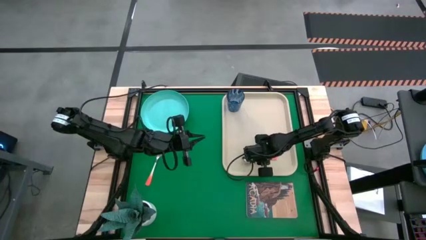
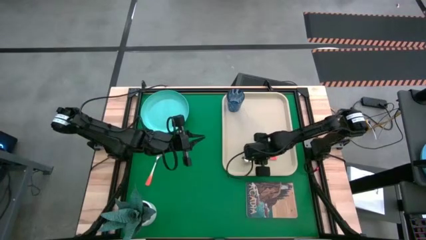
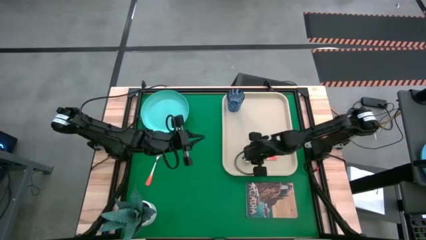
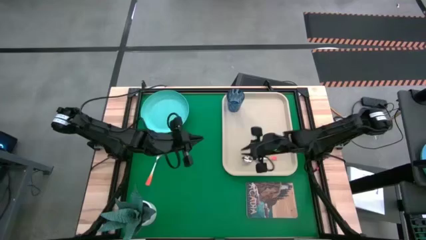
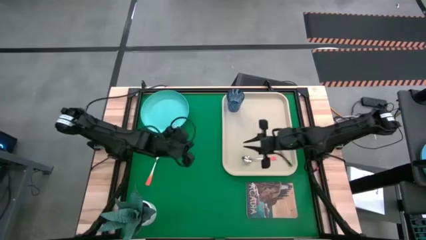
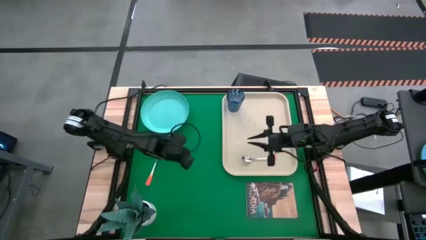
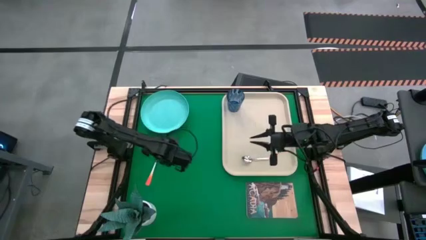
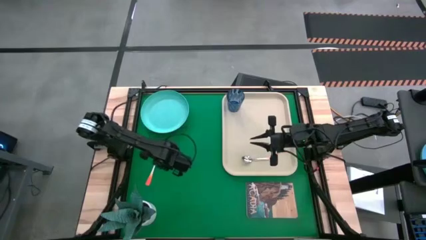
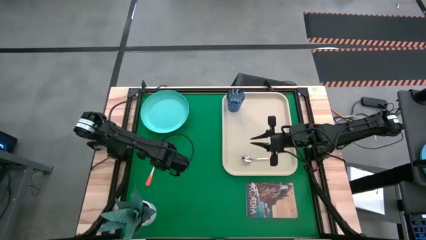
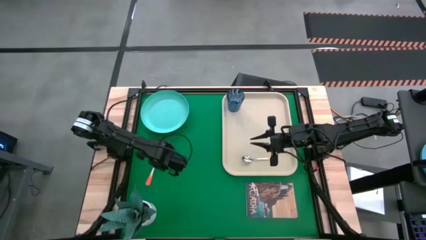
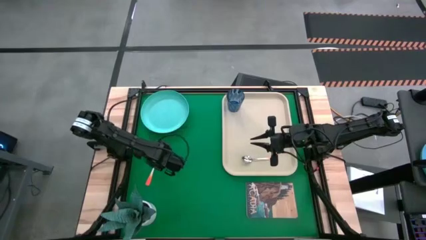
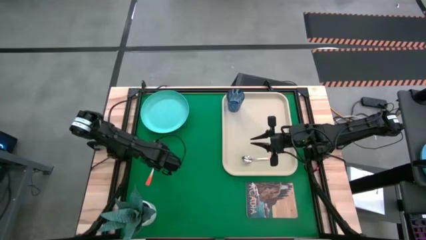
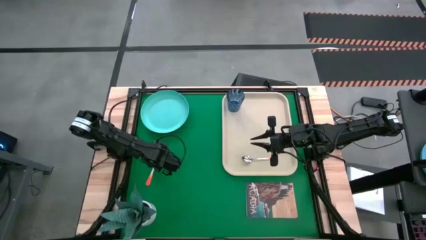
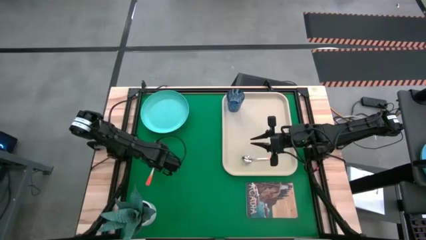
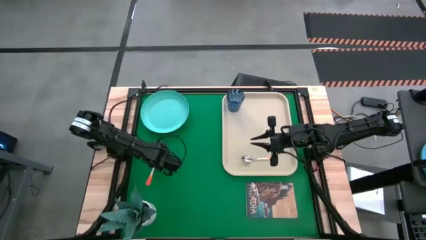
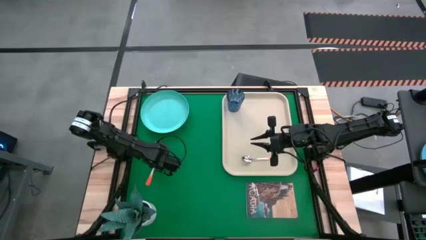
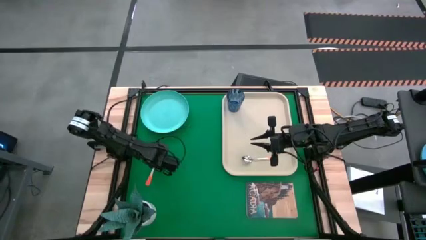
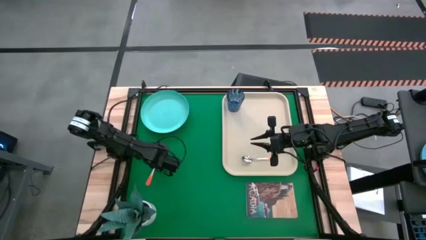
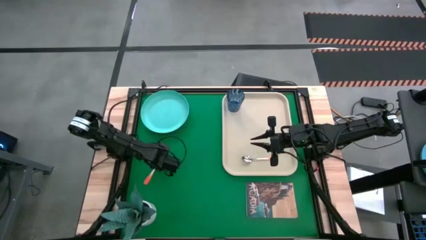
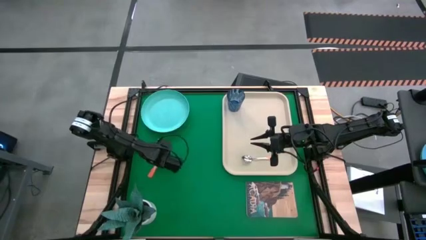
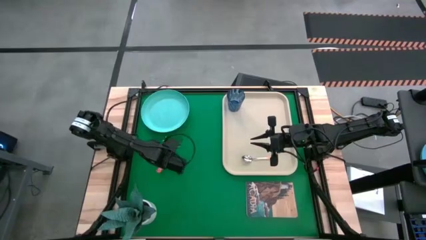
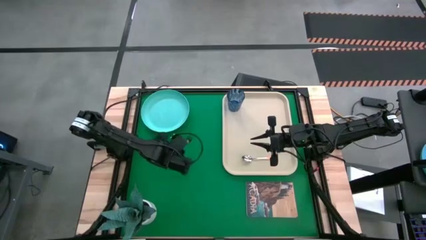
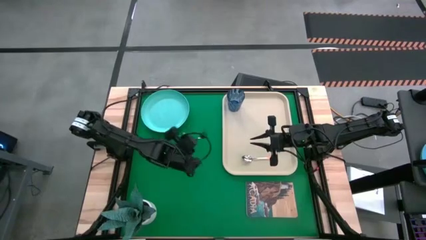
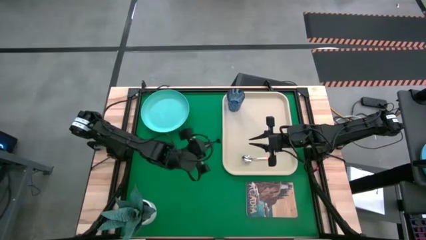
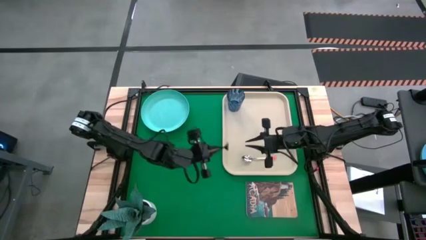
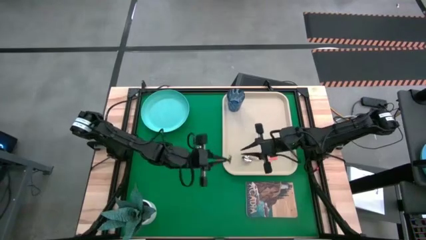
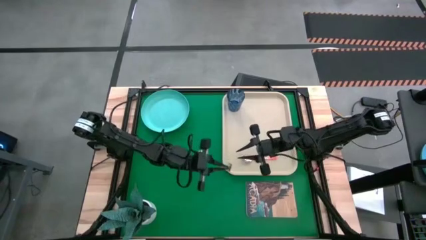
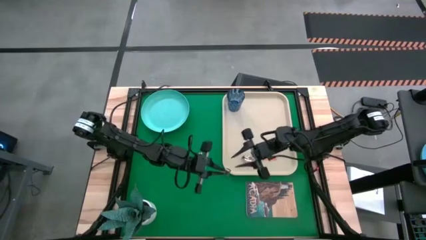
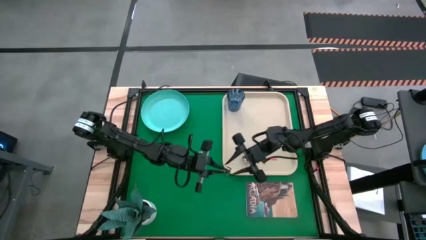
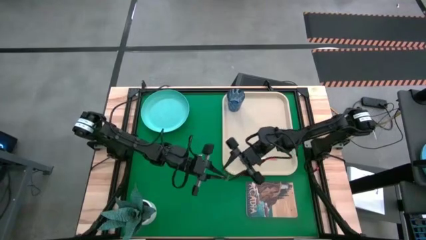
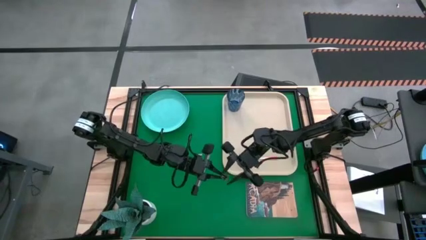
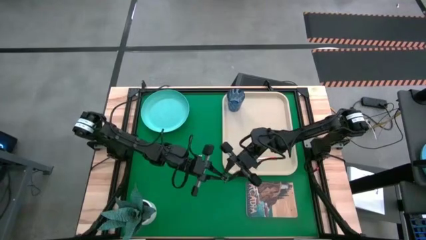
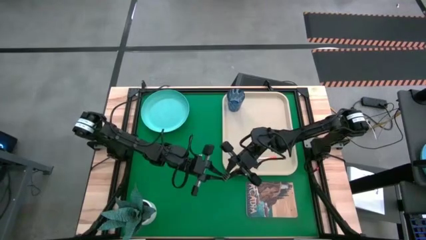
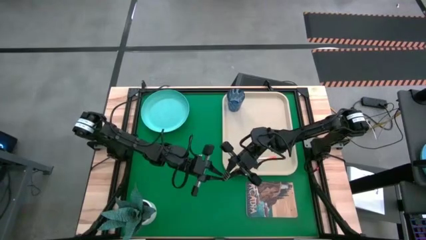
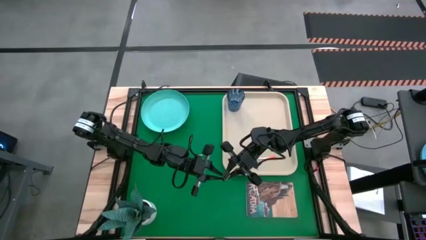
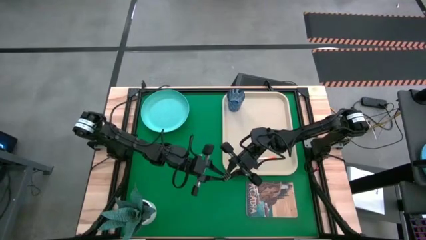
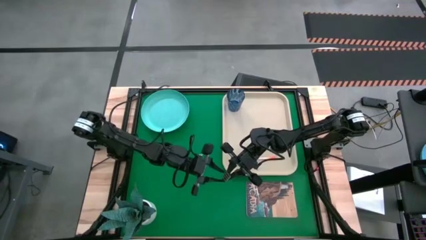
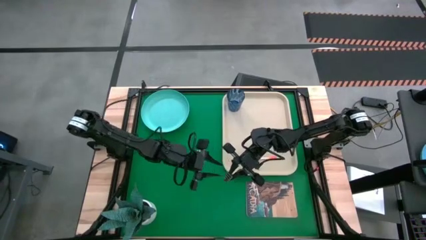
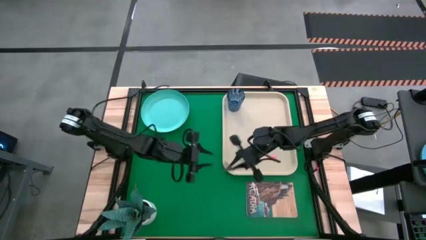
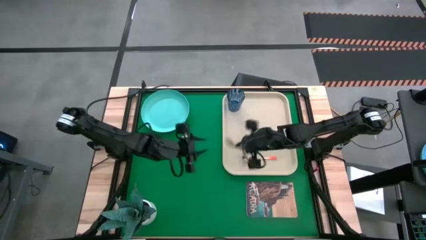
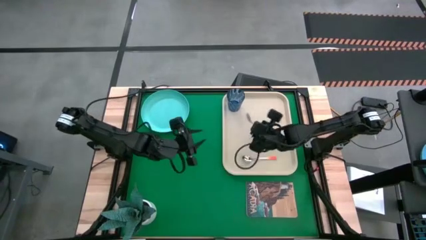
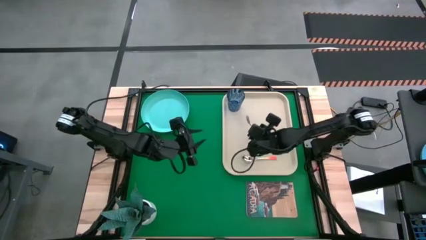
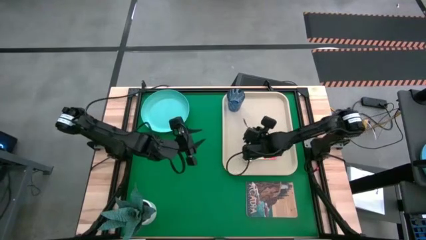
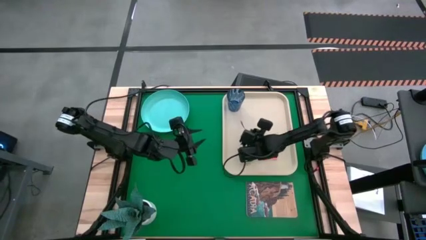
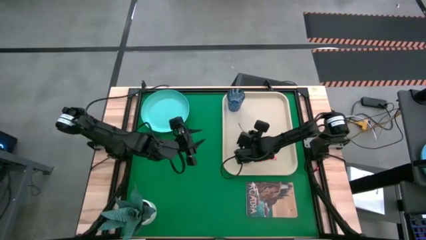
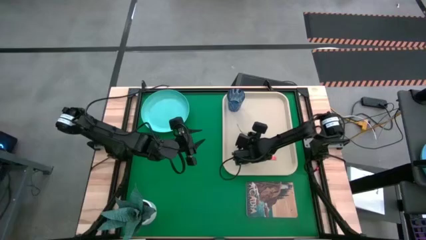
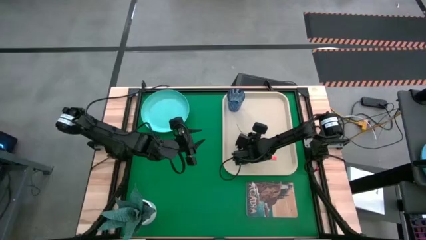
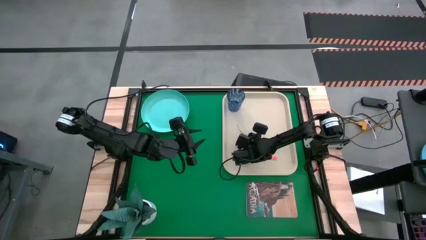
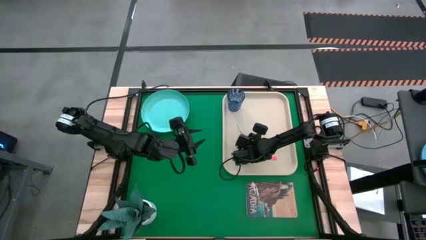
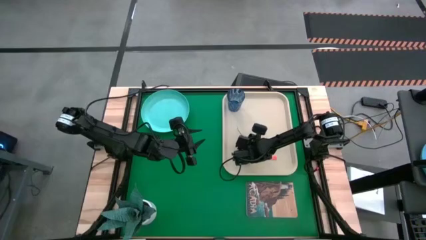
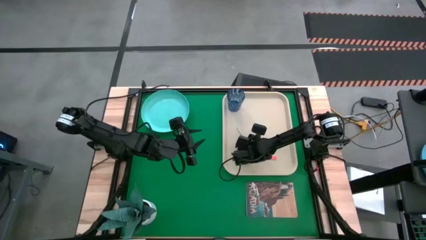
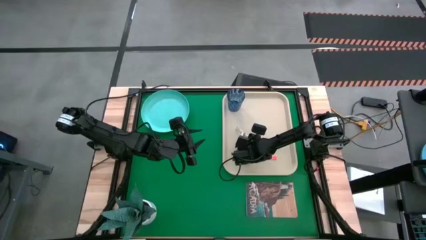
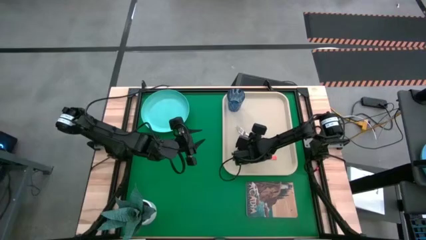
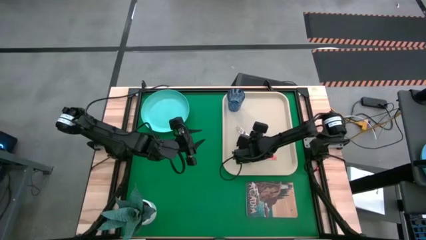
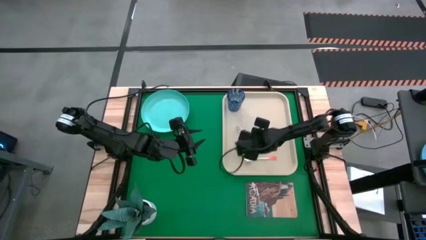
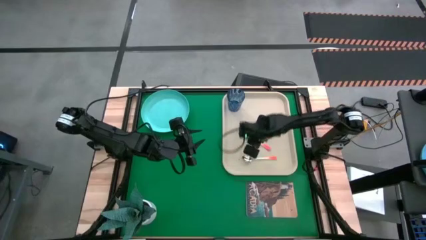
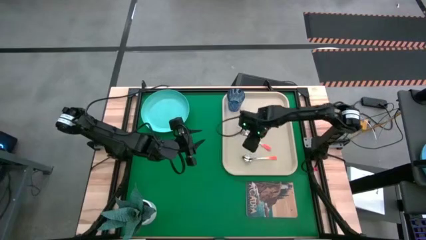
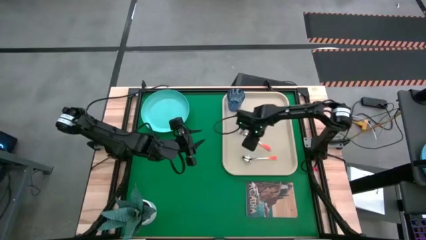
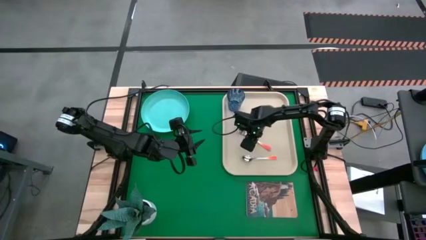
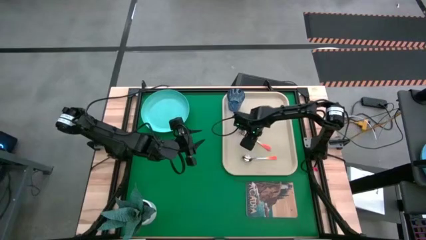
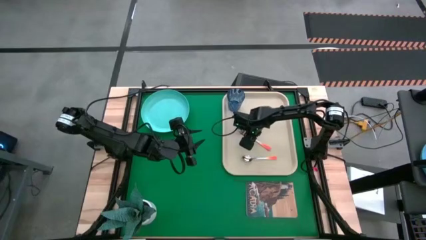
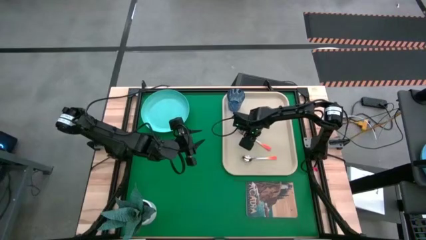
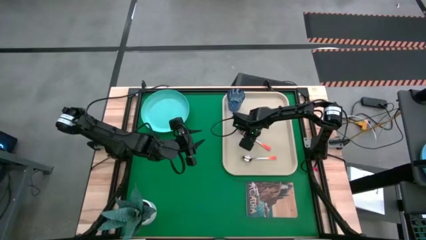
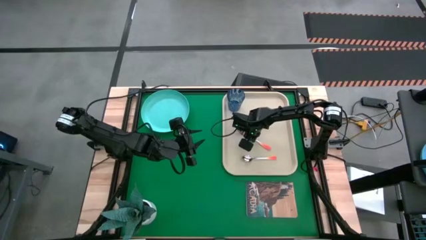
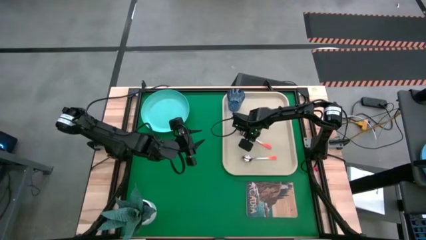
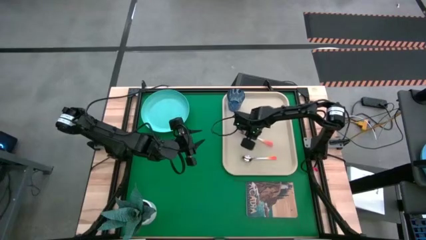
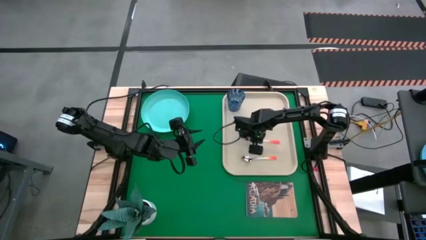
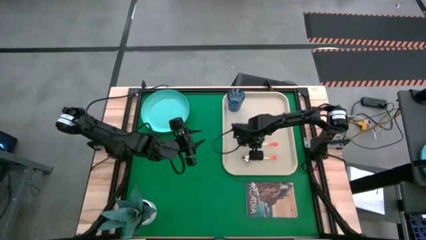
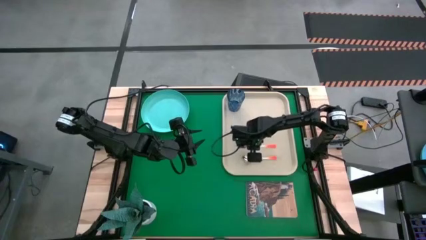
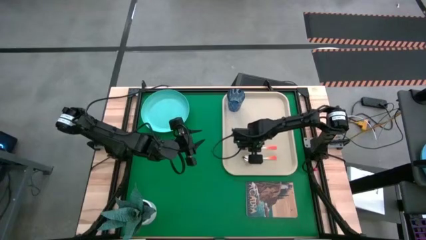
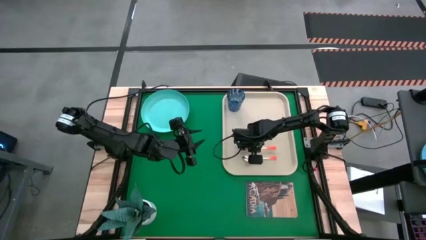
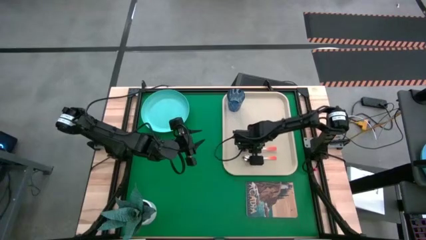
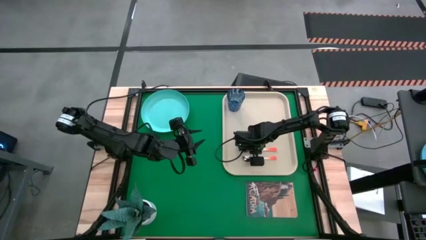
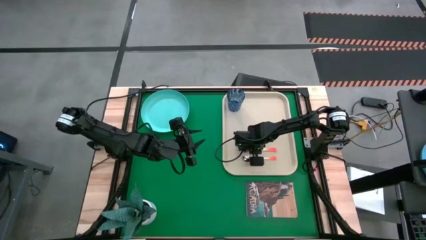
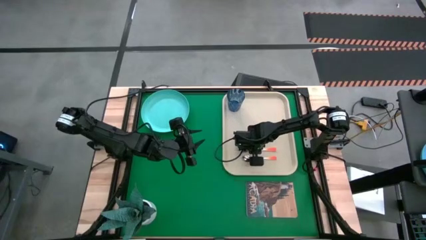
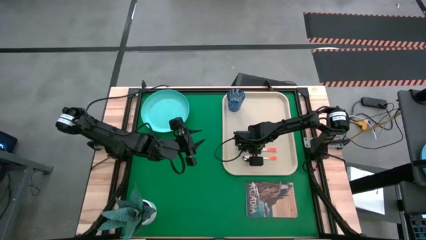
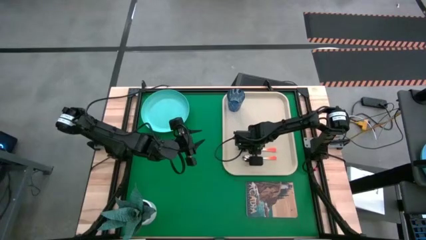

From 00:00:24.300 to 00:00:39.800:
Task: Pick and place plate/cup/fork/spoon on tray
Put the orange fork on the white serving tray to the top of the orange spoon
